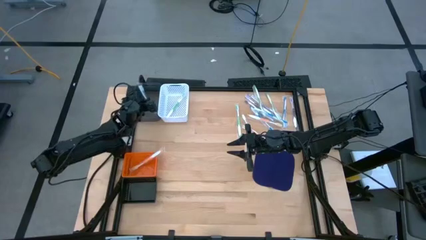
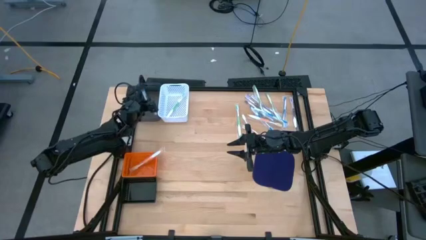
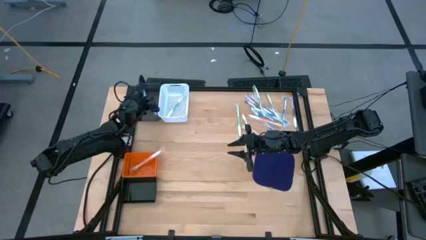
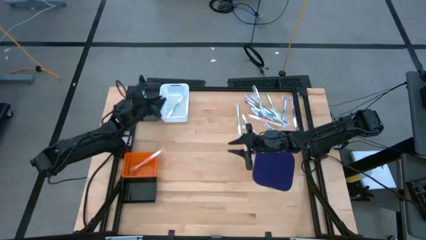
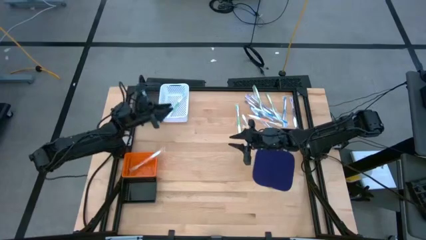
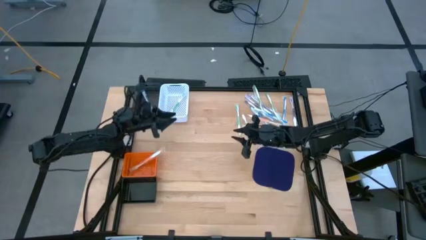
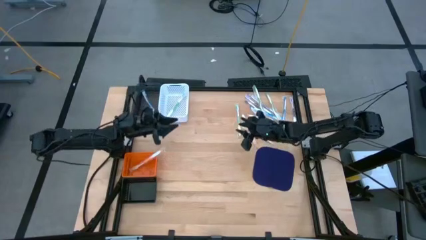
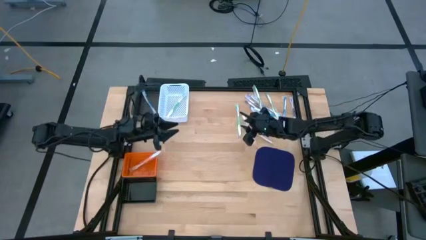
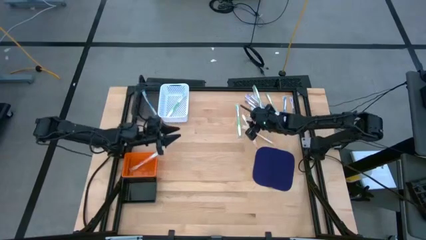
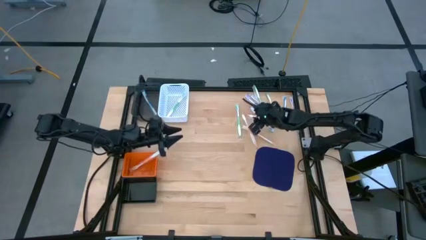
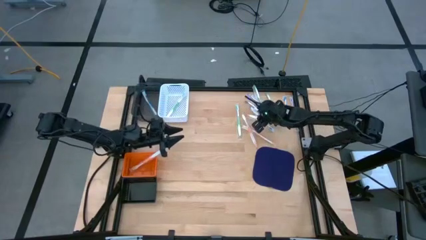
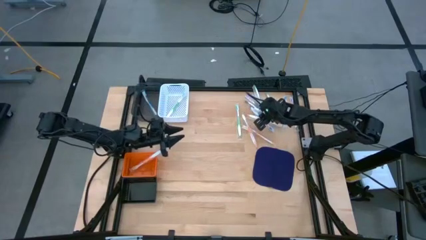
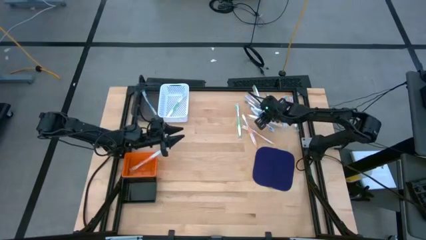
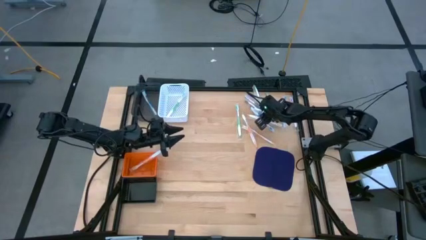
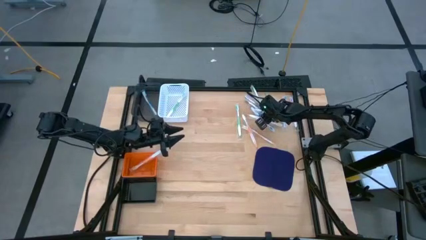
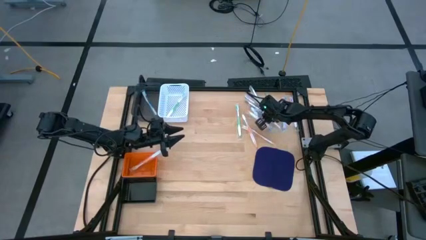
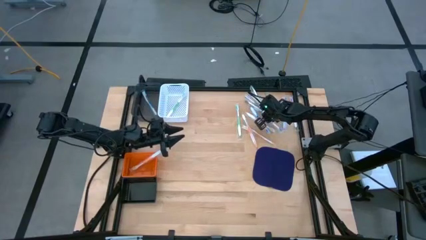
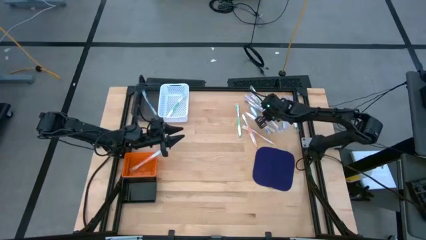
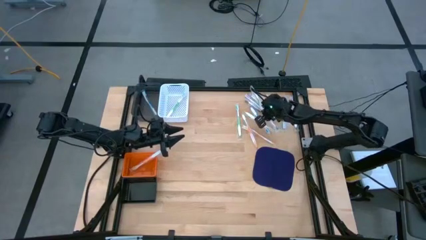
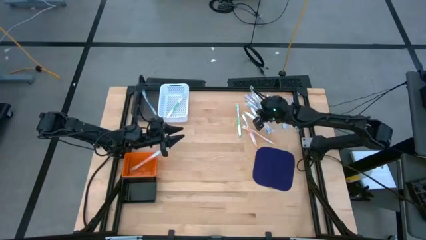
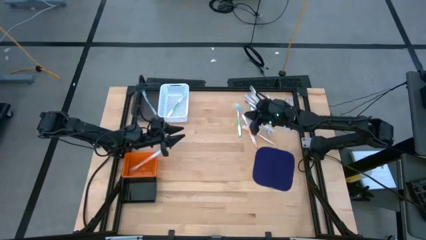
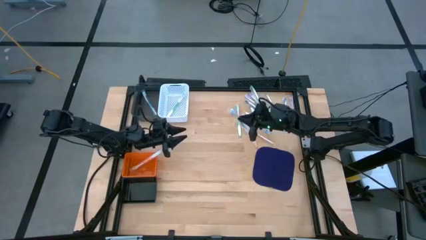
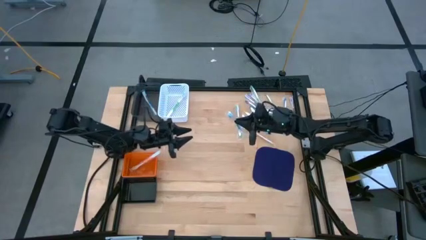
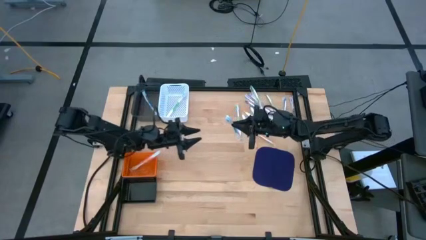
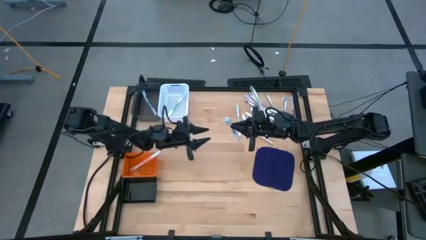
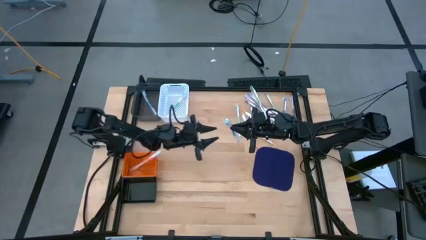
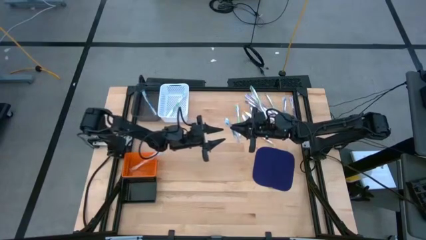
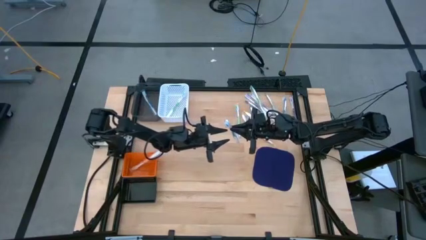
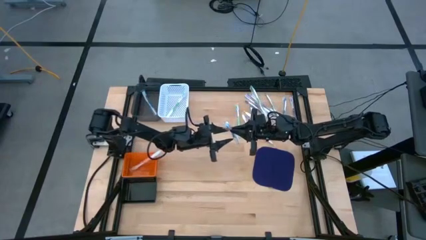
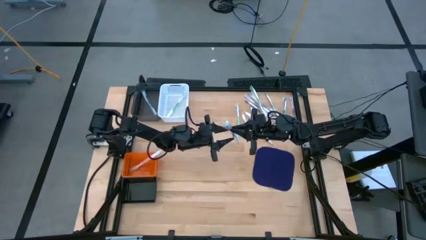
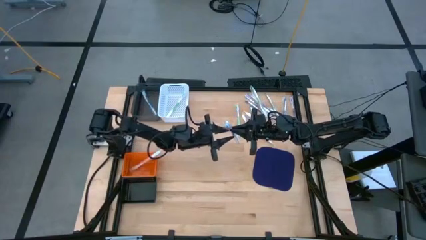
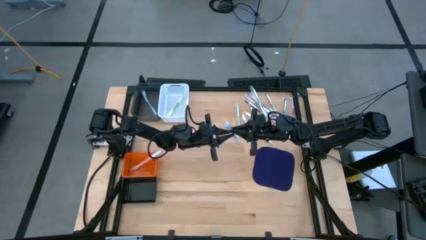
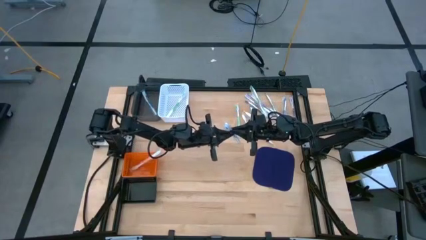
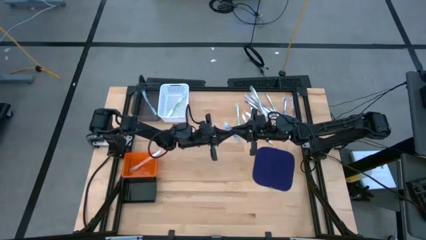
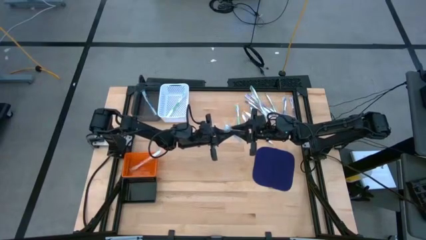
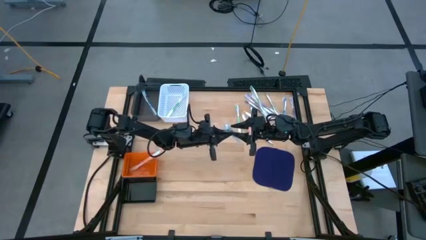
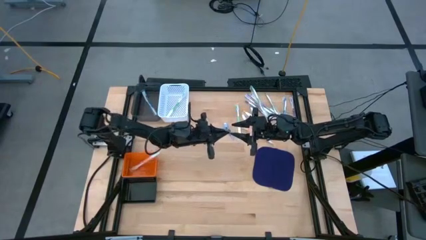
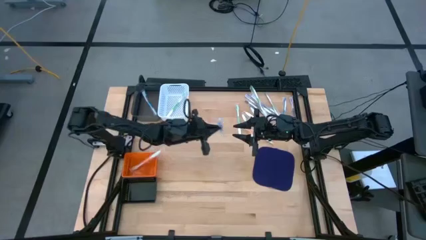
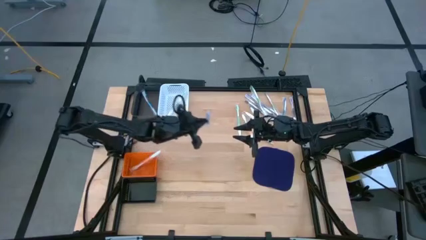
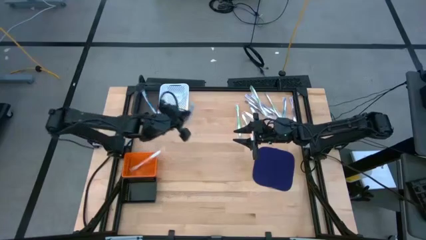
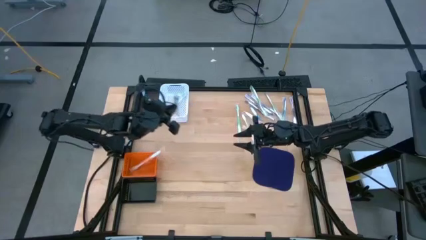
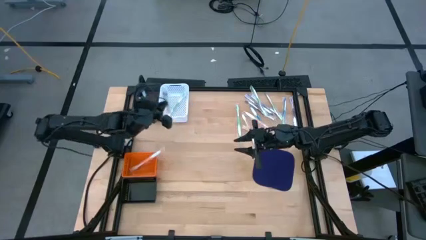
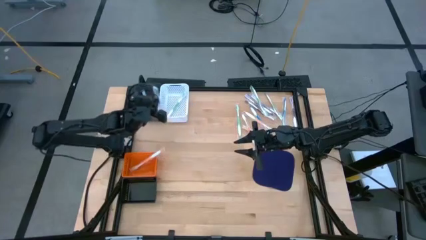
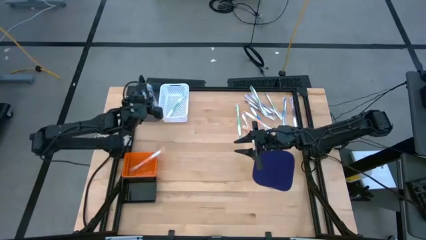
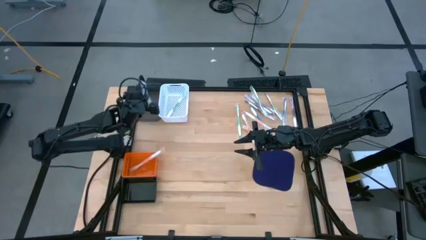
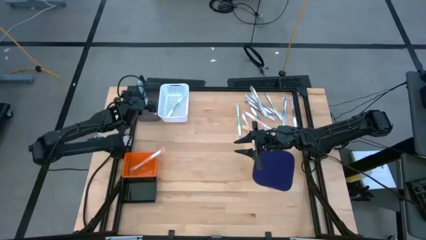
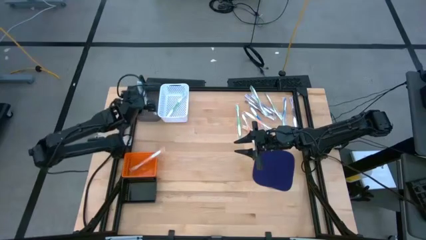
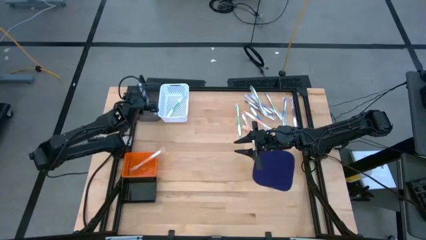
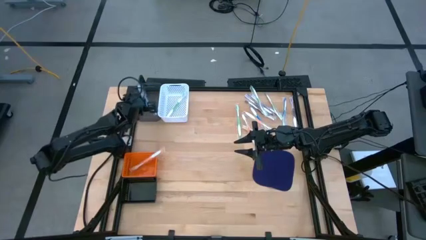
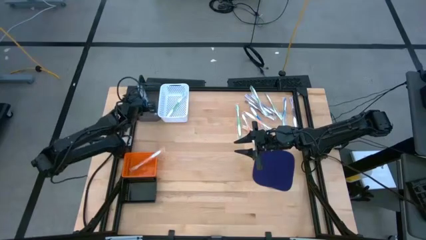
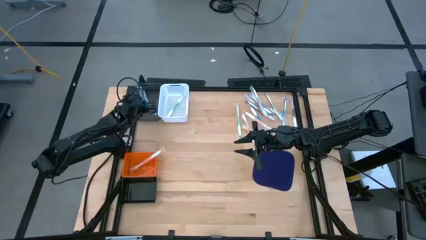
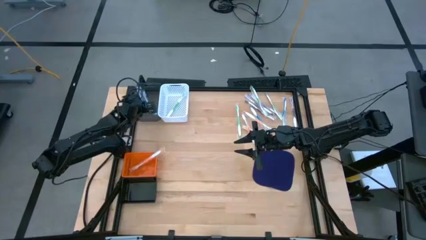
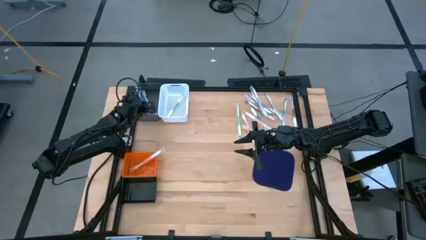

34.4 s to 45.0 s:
Task: Pick & Place Toothbrushes
Put the blue toothbrush into the gray bin

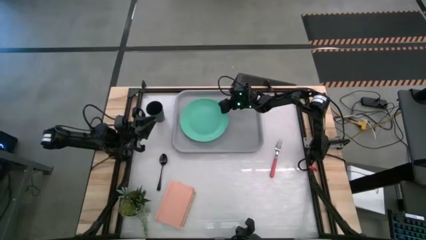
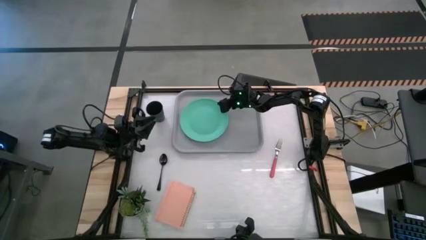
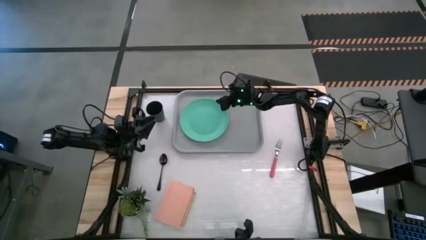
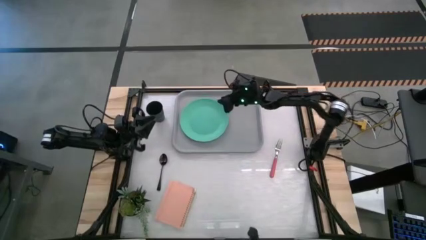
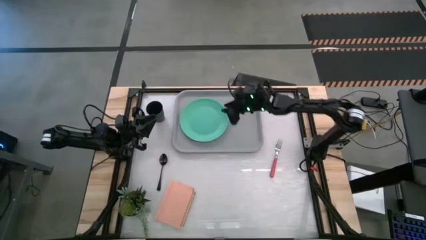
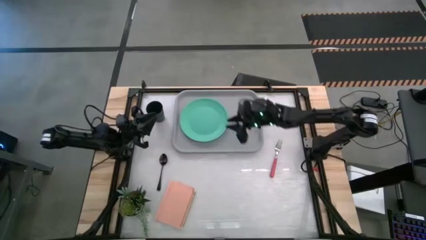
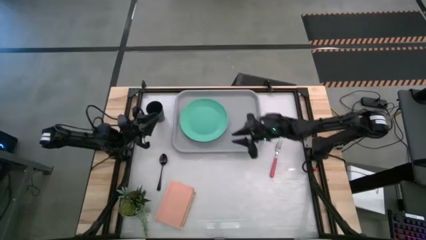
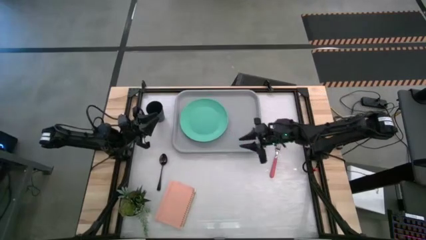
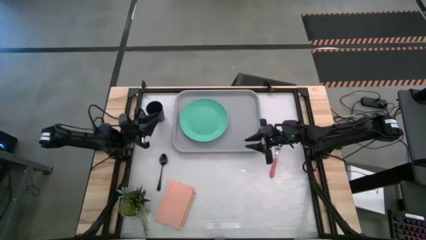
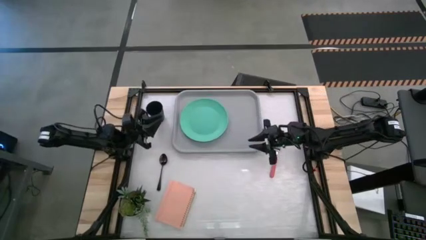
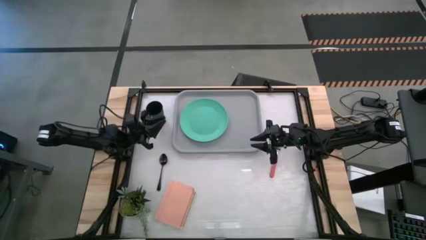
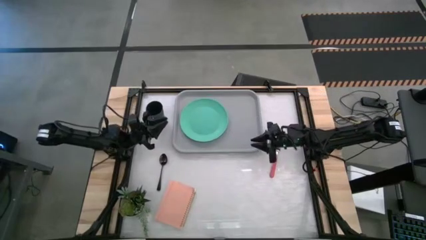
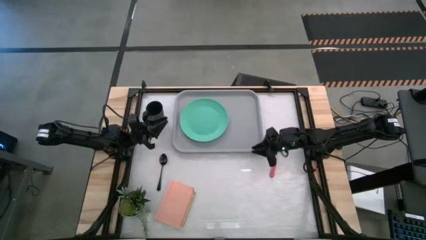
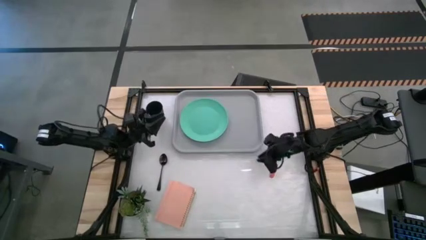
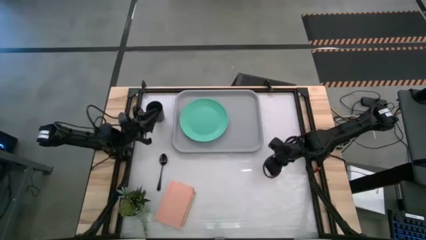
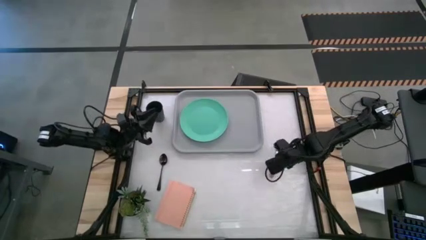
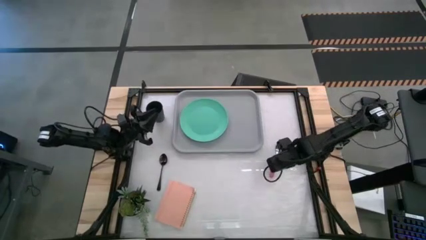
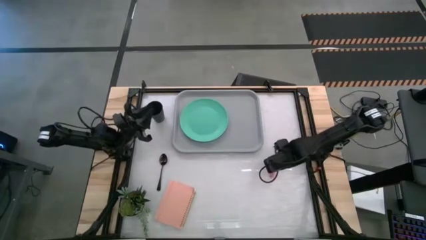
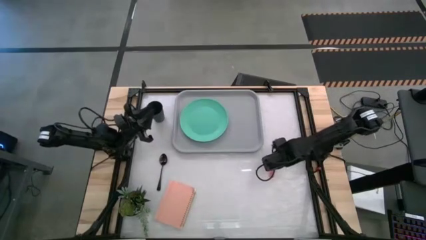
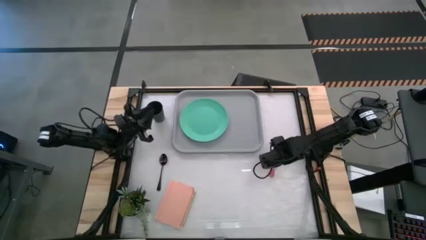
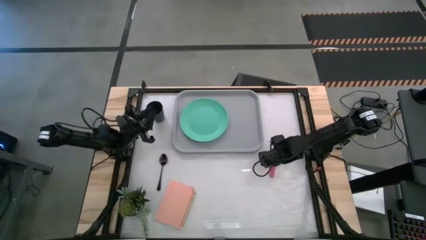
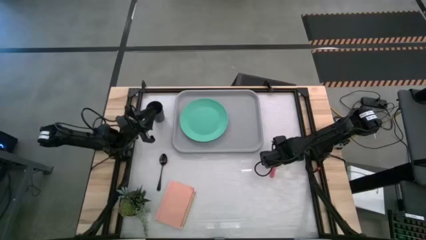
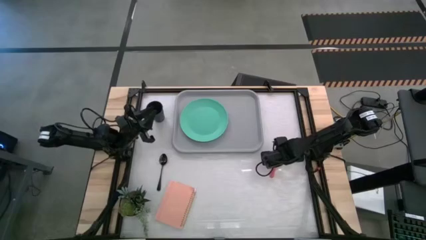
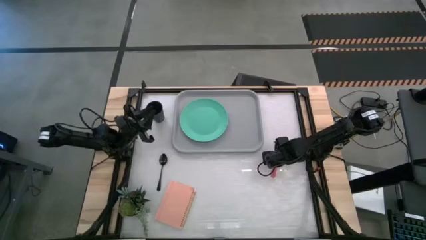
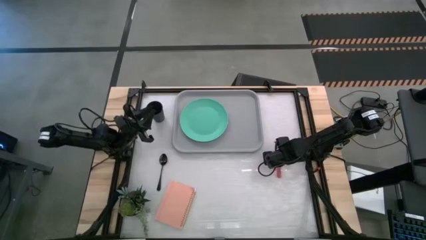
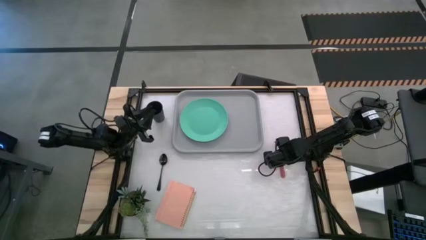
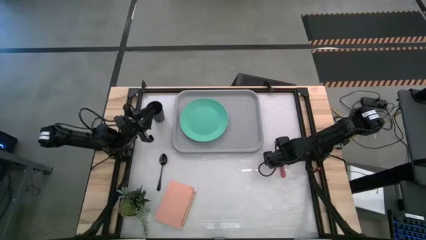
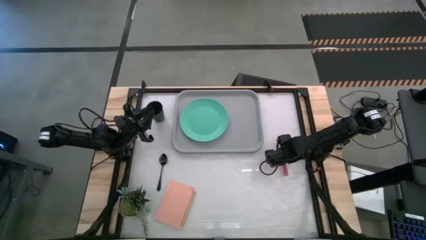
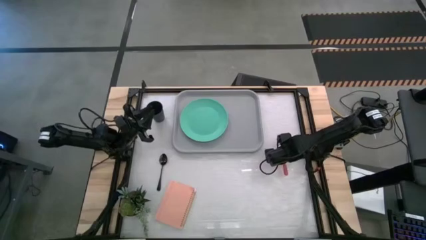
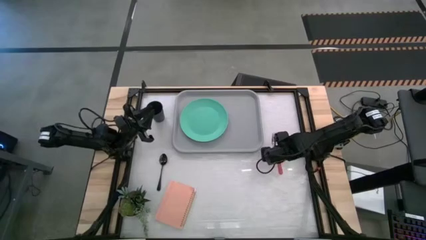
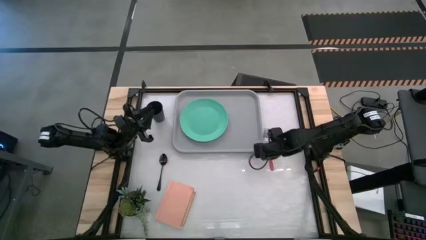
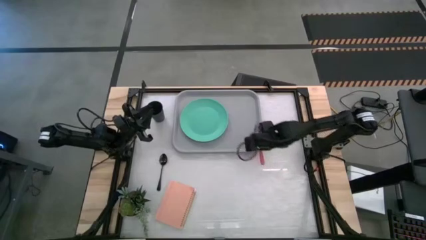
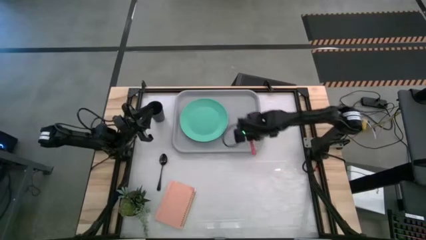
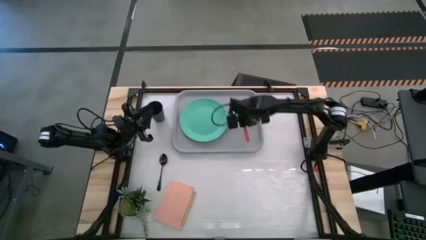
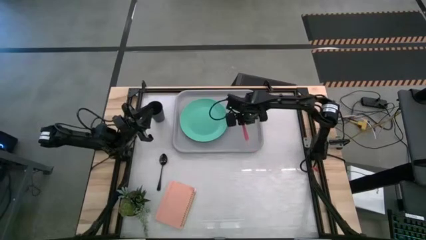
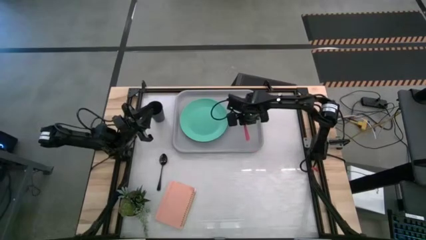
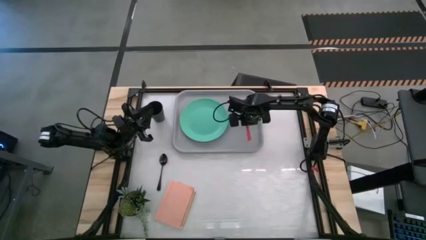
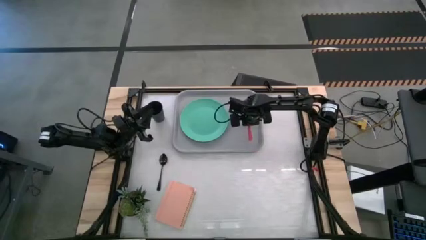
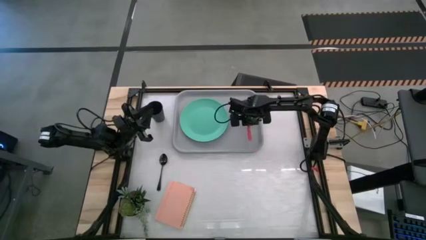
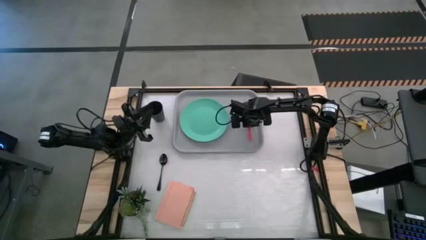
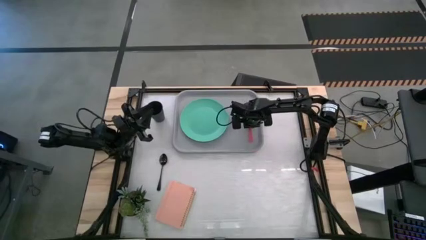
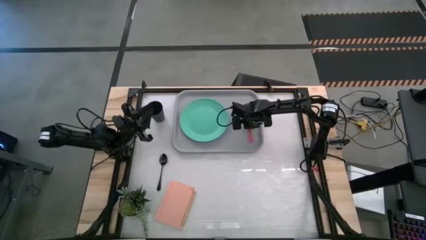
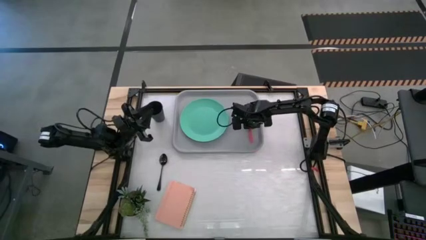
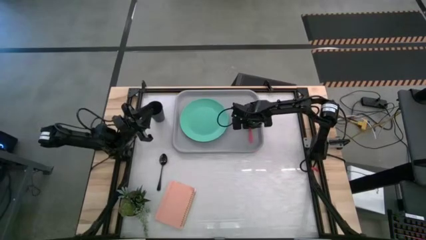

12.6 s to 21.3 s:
Task: Pick and place plate/cup/fork/spoon on tray
Put the pink fork to the right of the green plate on the gray food tray
